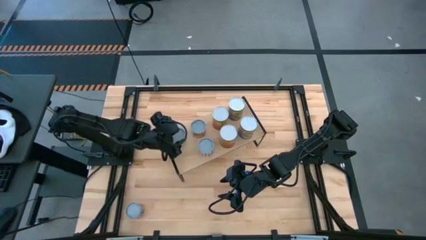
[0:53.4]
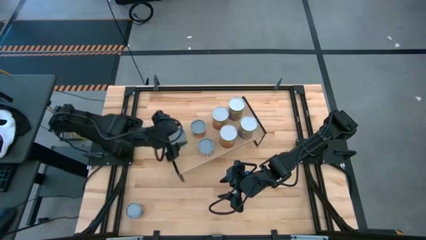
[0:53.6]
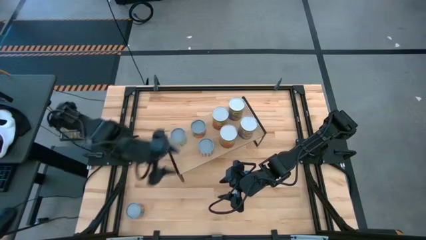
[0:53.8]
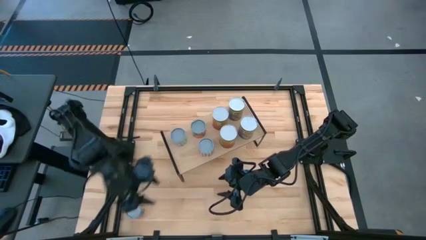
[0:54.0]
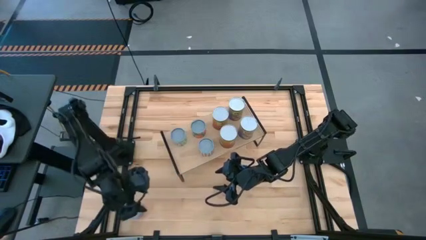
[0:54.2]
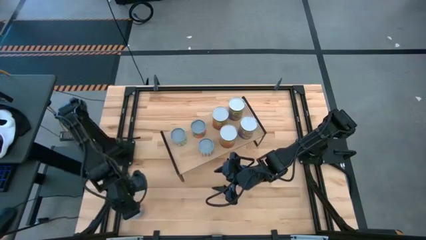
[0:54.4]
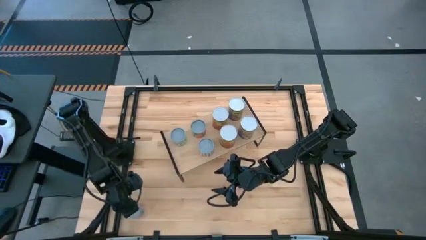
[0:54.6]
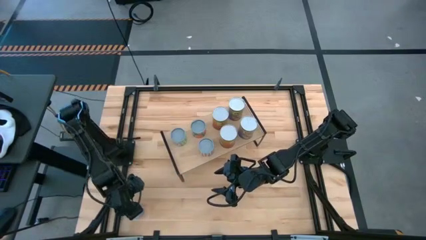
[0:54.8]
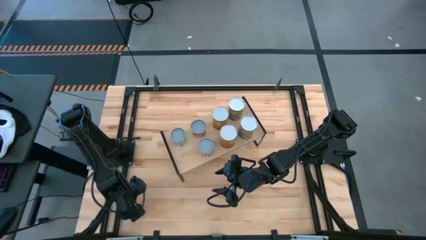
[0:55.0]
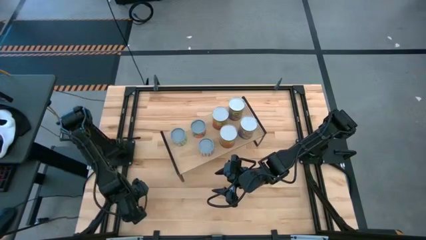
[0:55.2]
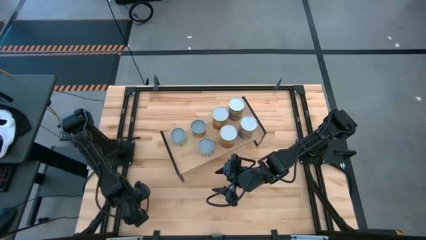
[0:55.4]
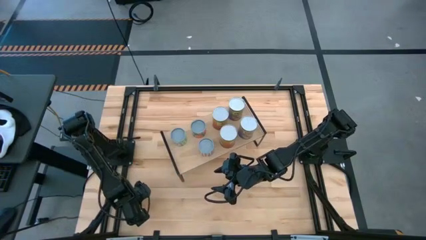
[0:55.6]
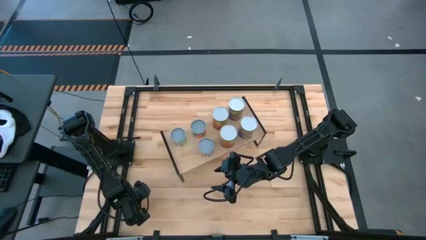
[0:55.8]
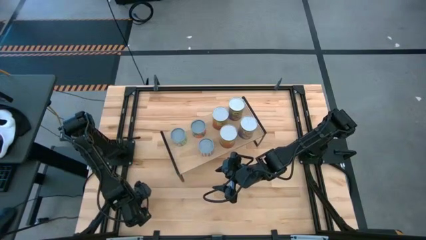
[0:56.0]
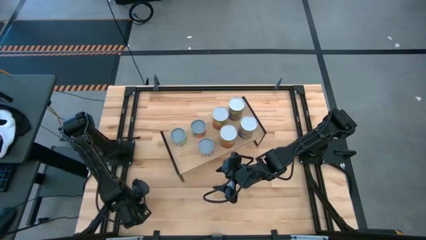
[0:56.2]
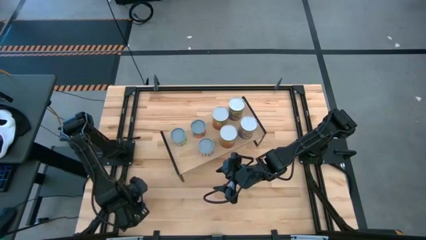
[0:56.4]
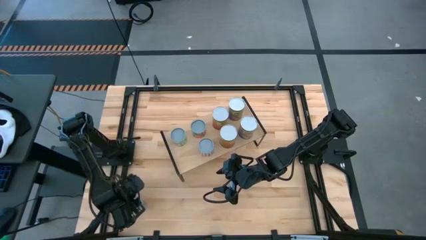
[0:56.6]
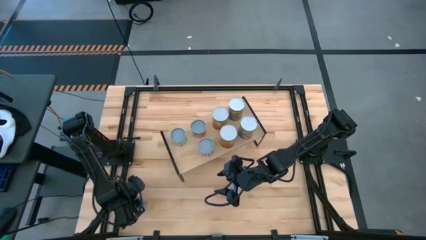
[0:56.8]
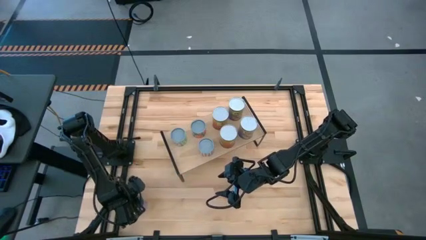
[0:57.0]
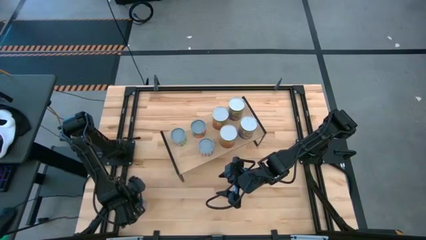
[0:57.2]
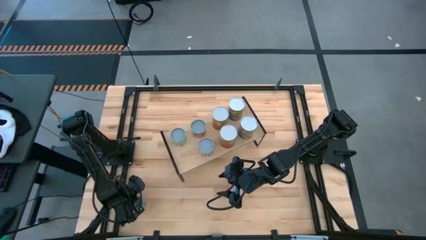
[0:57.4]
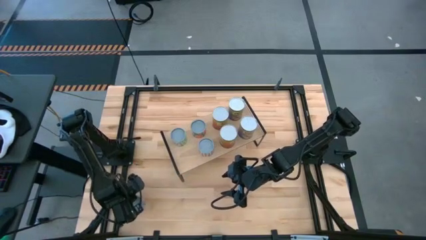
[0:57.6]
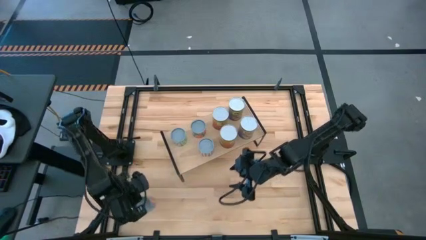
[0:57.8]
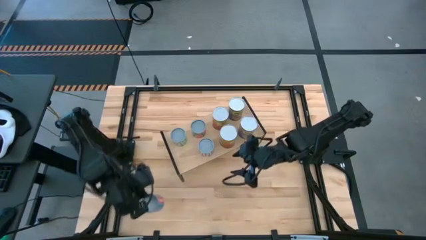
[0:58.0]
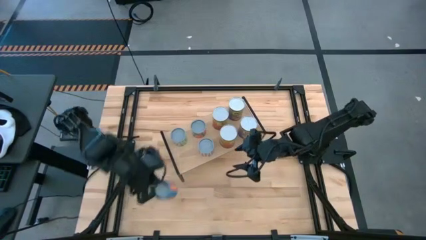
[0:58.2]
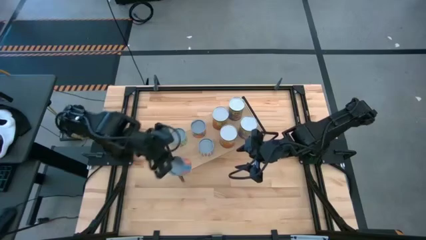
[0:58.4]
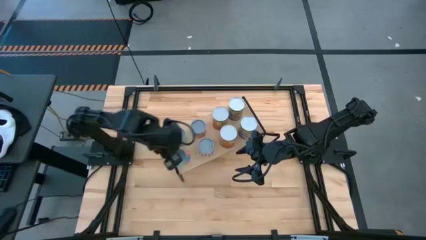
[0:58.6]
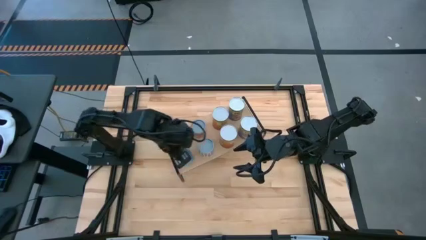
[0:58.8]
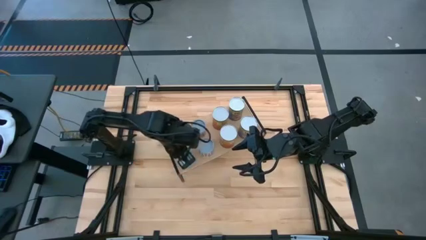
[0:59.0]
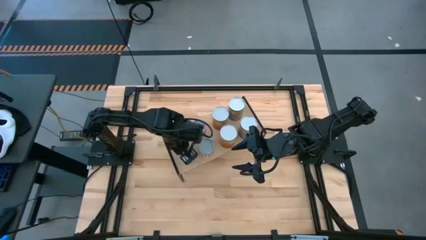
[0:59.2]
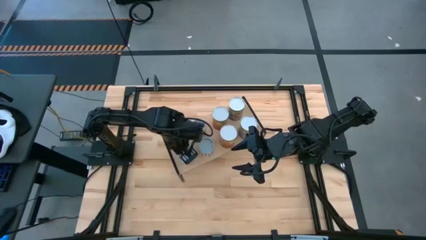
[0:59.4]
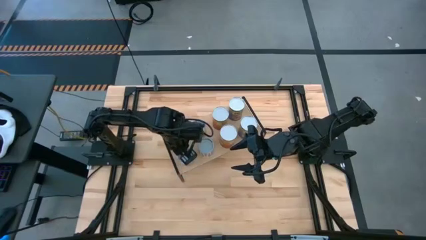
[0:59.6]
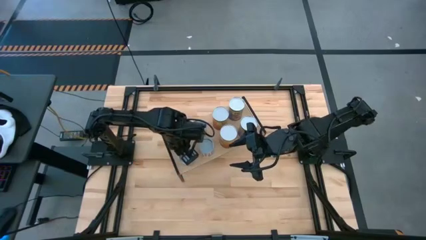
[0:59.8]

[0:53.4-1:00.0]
Task: Pick and place cans onto a shelf
Put the small canned corn on the shelf

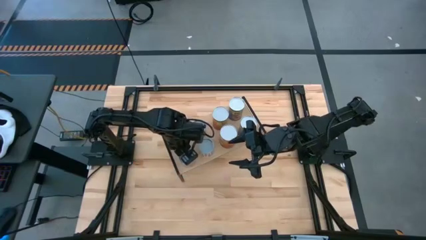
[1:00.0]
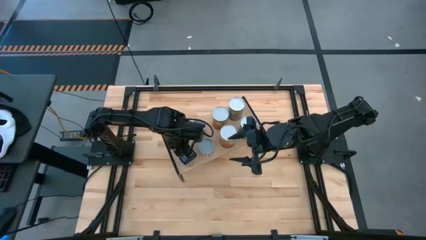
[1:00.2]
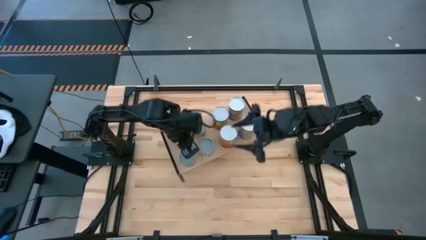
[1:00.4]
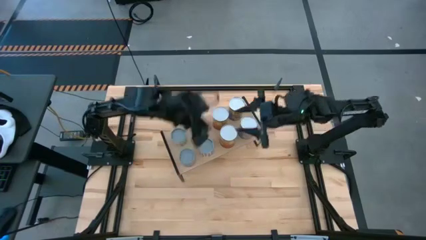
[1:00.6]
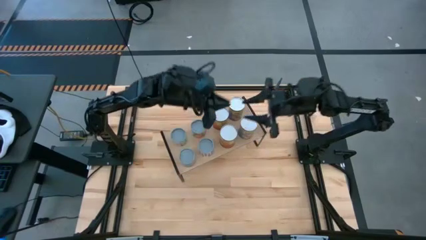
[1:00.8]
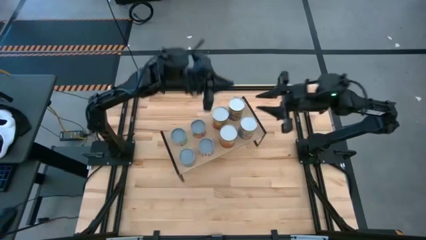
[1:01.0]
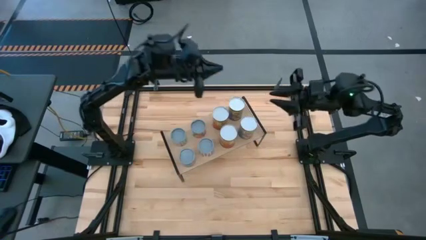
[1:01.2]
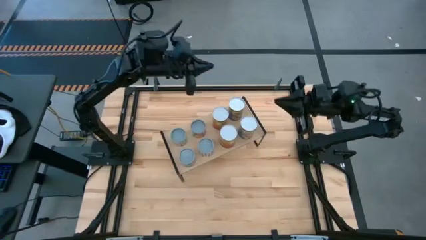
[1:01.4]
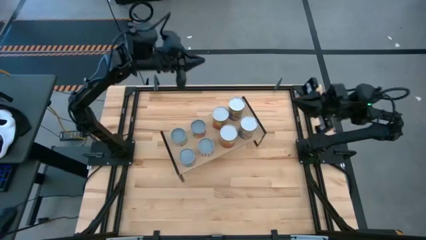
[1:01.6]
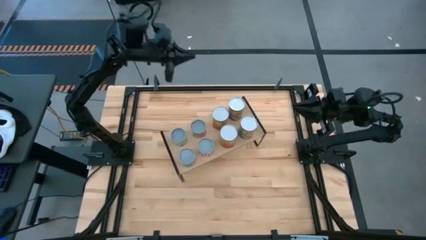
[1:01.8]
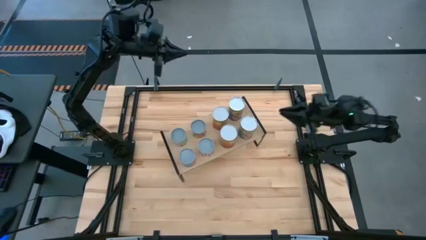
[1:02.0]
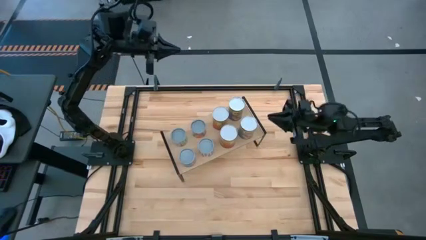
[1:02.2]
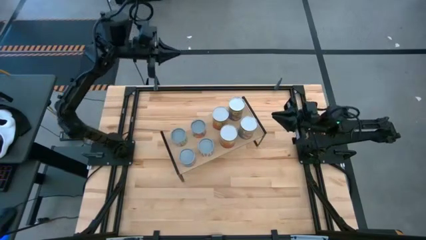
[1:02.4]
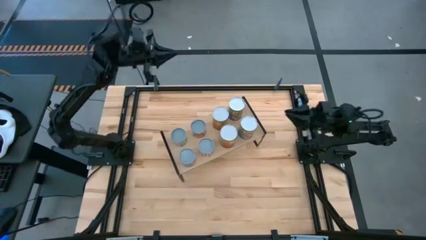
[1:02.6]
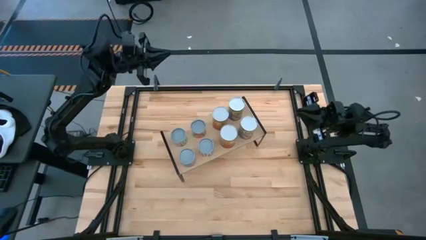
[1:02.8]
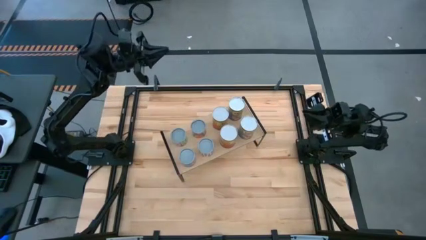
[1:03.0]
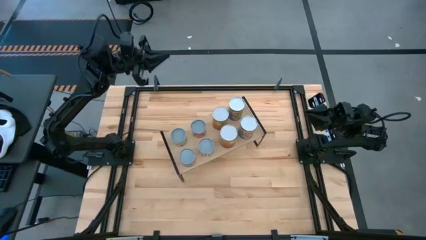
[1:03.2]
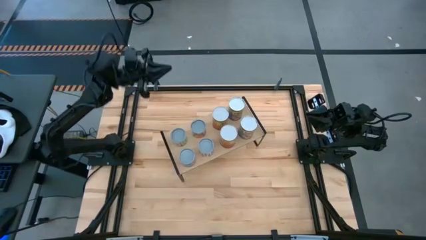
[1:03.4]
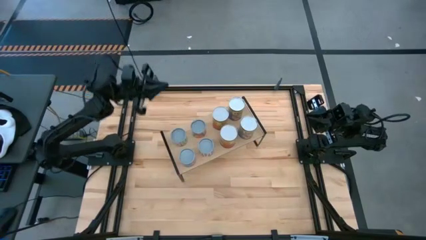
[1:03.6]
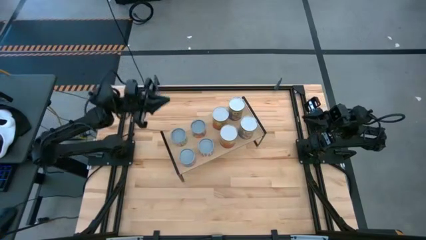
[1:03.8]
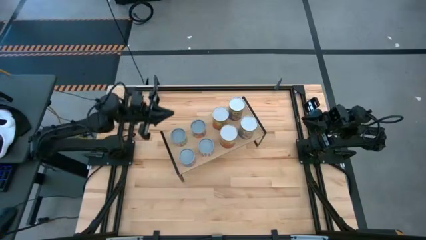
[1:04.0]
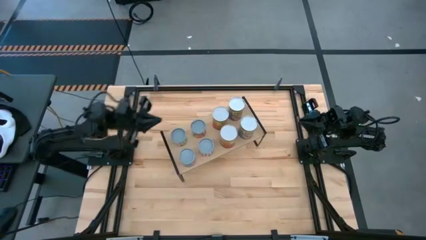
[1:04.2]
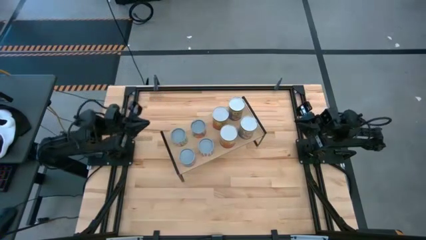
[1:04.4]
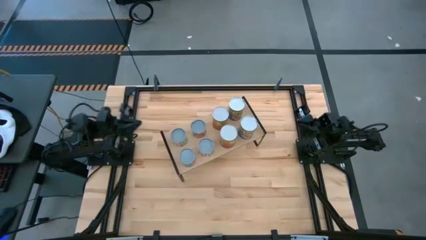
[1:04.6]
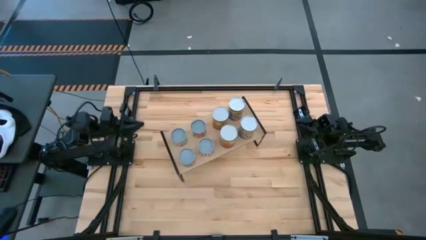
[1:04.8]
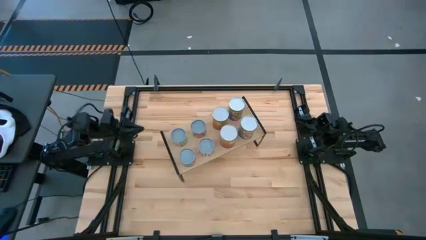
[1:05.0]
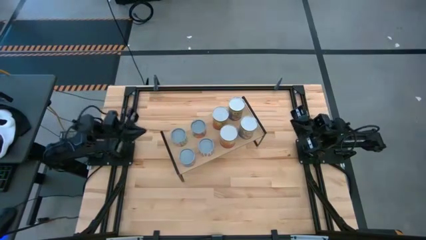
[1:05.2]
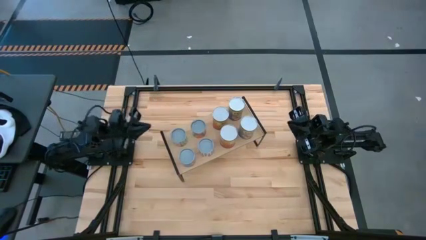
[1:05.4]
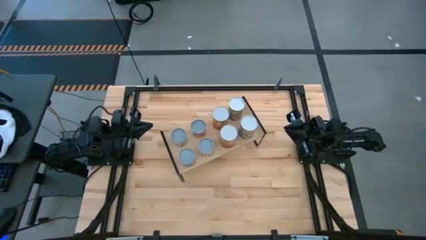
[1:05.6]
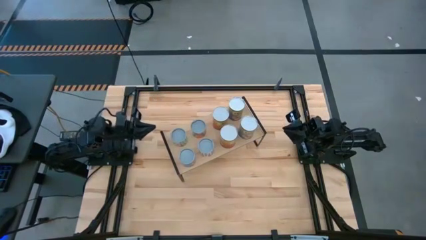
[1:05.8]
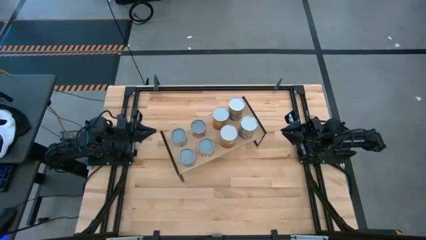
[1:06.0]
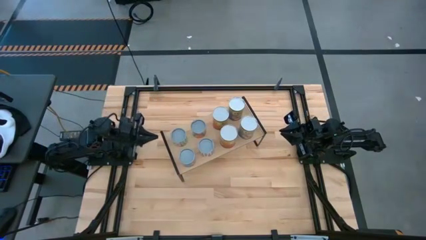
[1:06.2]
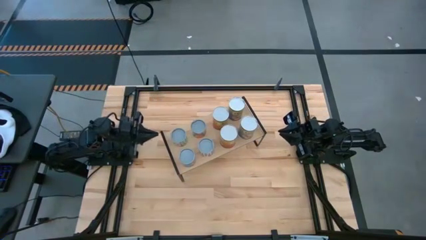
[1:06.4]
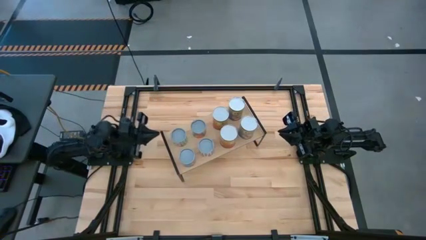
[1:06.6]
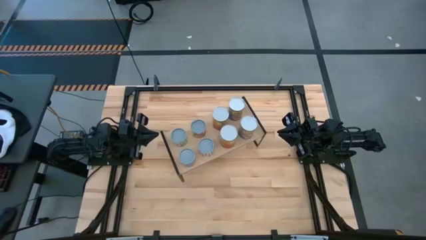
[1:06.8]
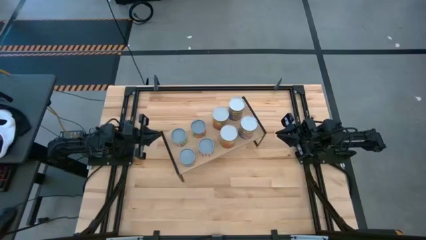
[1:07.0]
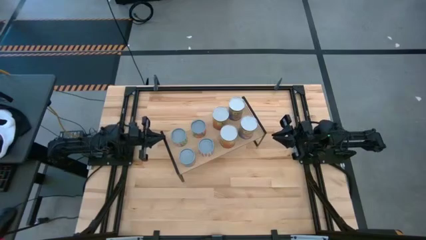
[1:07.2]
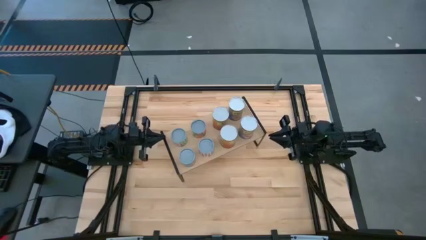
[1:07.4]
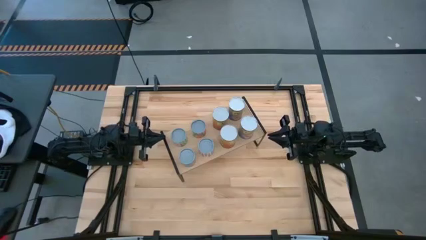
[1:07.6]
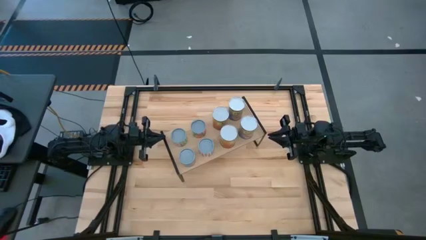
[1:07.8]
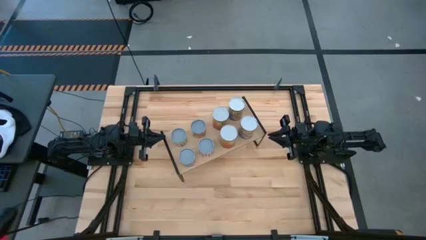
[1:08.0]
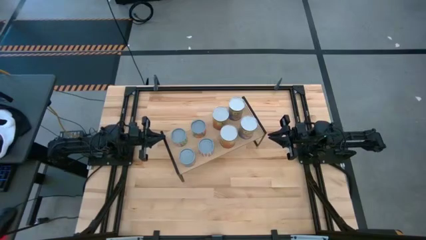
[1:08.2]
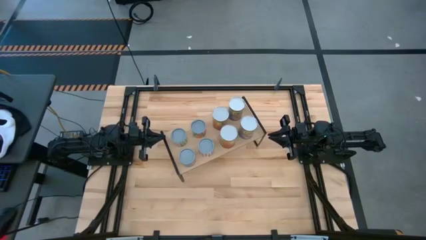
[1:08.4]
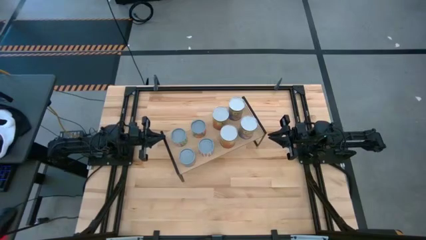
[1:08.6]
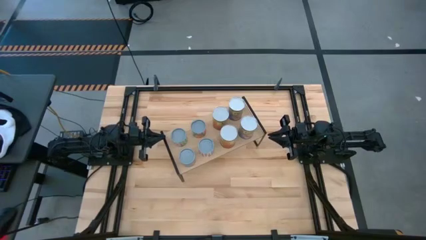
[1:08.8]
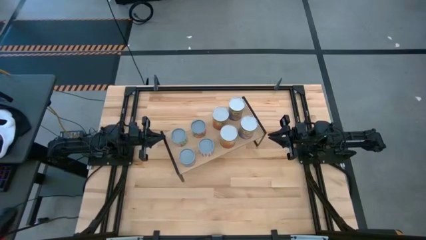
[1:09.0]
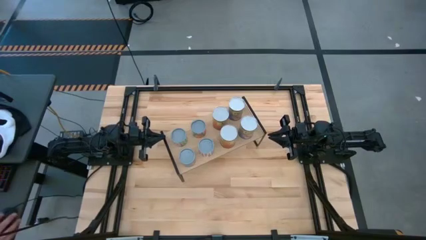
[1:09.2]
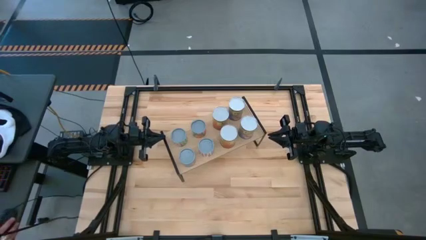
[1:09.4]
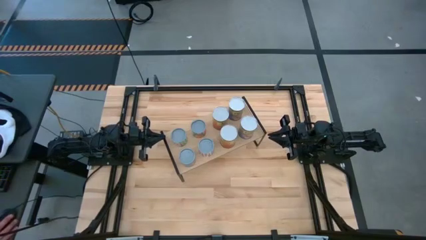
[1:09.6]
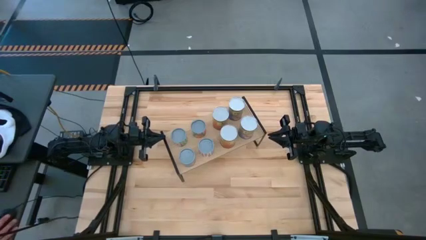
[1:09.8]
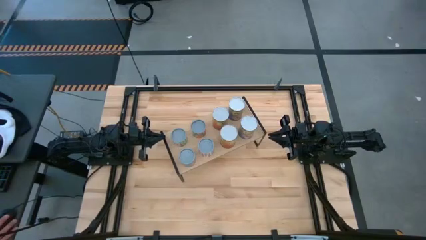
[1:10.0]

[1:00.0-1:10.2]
Return to Home Position
